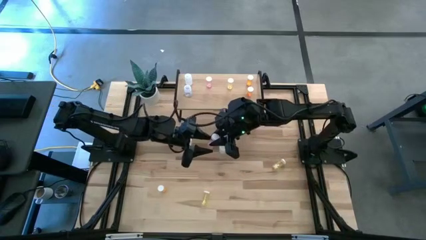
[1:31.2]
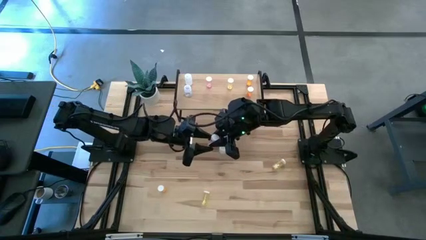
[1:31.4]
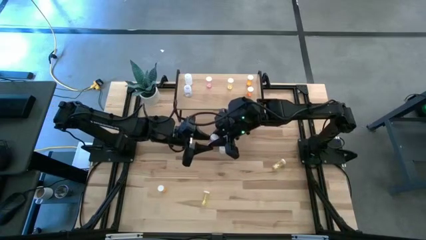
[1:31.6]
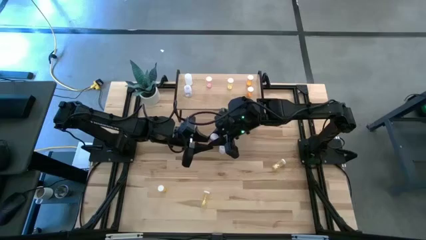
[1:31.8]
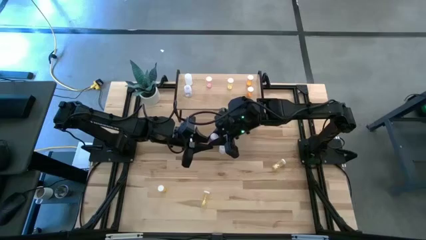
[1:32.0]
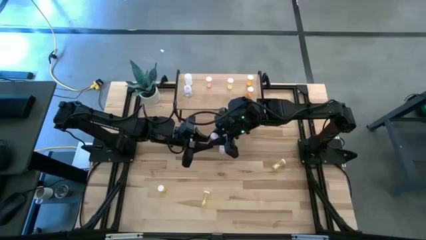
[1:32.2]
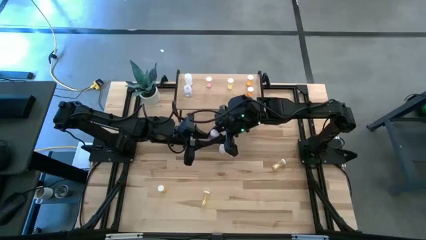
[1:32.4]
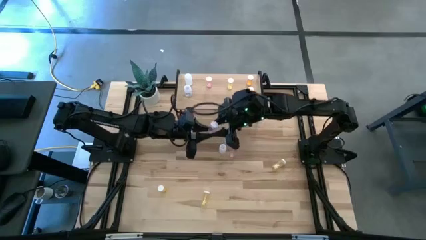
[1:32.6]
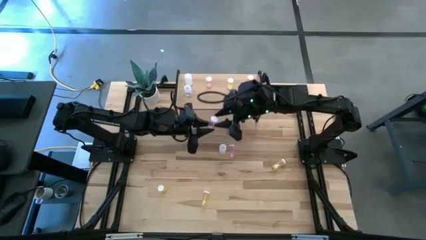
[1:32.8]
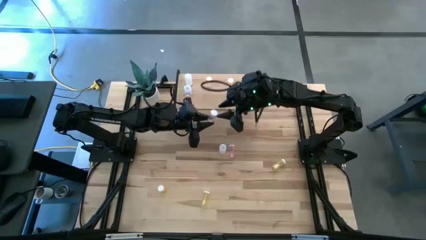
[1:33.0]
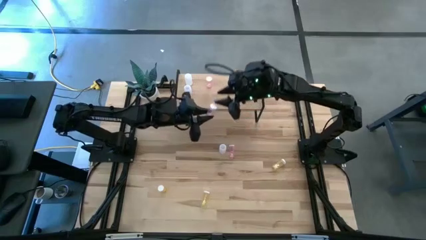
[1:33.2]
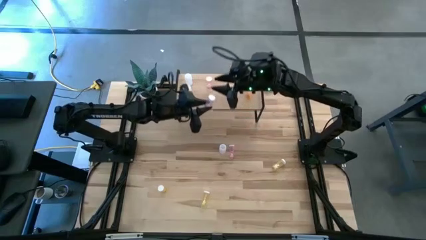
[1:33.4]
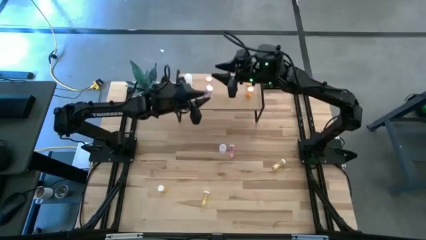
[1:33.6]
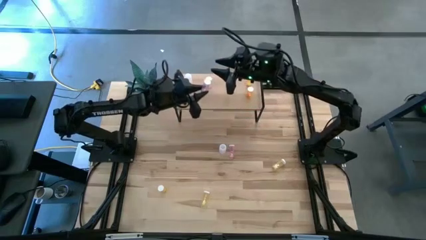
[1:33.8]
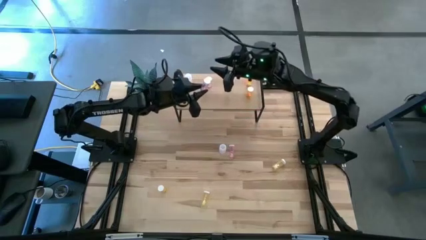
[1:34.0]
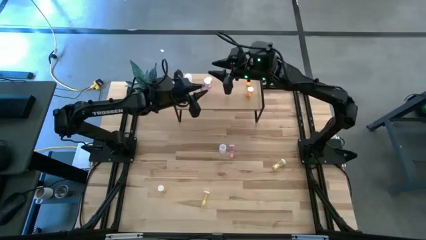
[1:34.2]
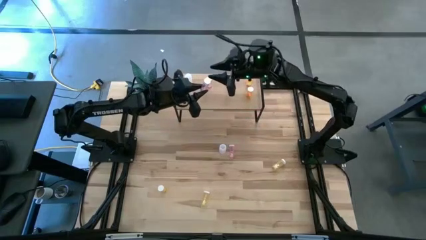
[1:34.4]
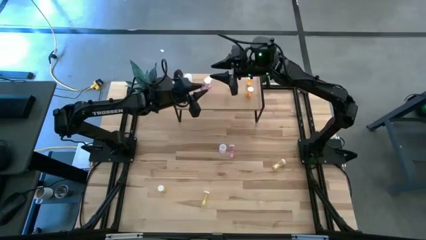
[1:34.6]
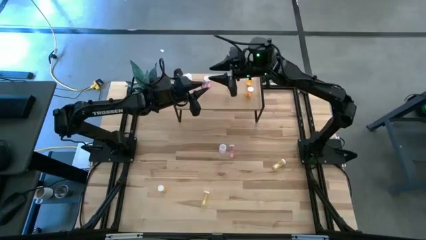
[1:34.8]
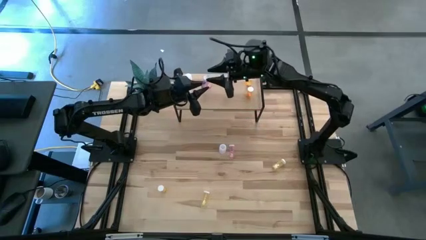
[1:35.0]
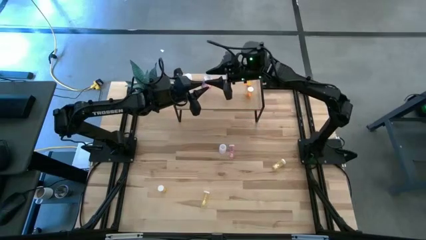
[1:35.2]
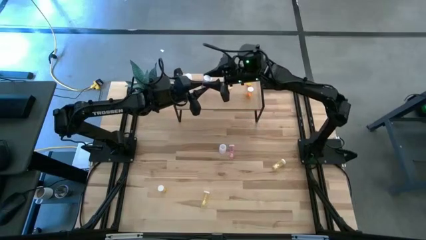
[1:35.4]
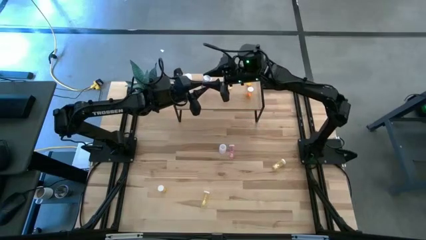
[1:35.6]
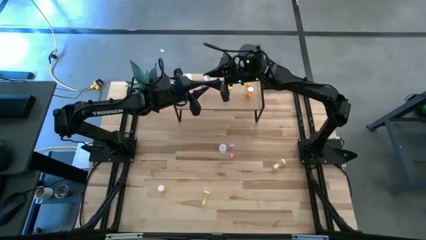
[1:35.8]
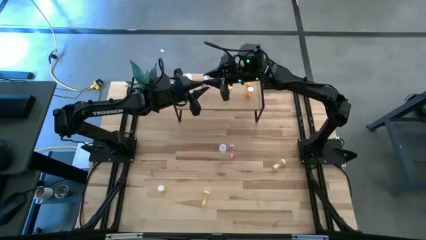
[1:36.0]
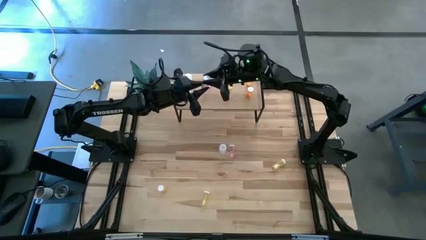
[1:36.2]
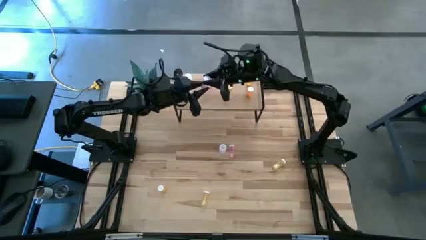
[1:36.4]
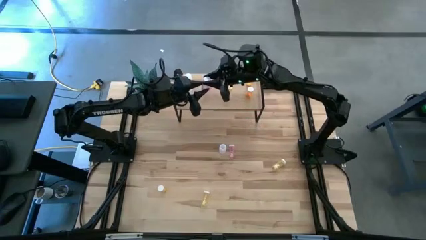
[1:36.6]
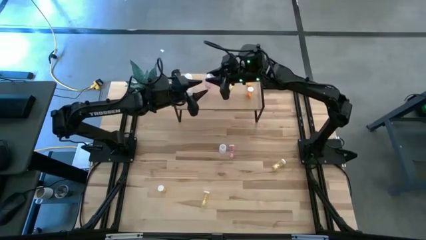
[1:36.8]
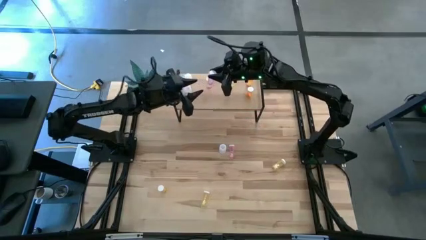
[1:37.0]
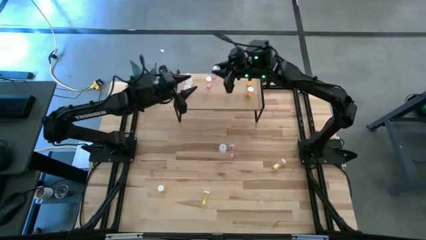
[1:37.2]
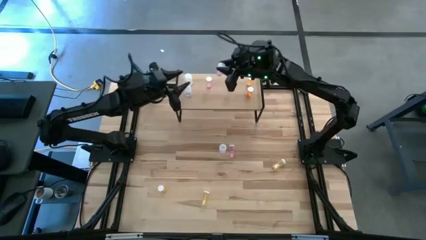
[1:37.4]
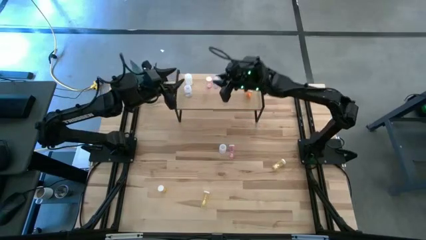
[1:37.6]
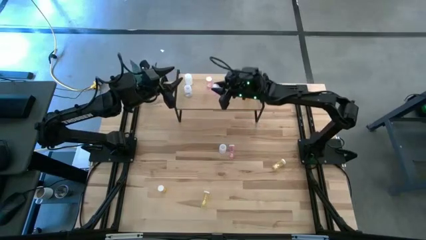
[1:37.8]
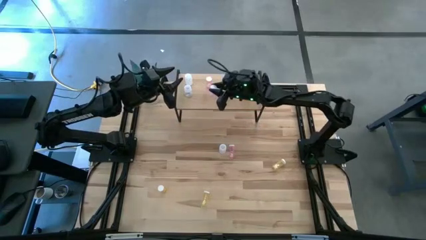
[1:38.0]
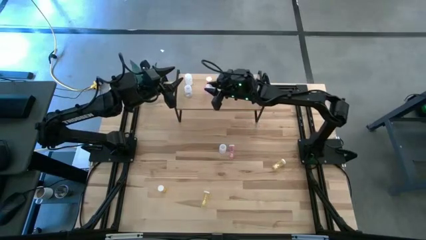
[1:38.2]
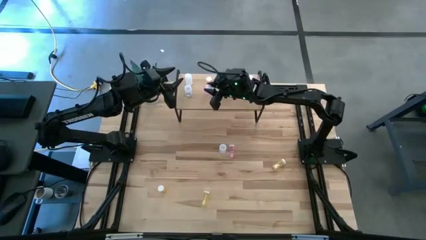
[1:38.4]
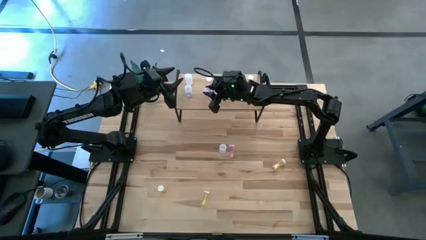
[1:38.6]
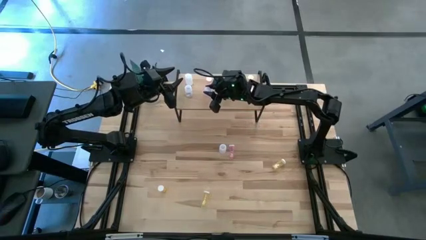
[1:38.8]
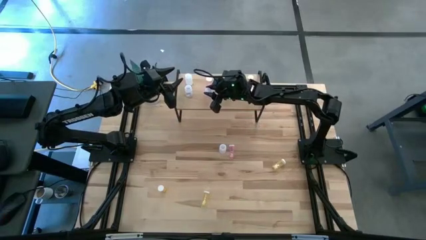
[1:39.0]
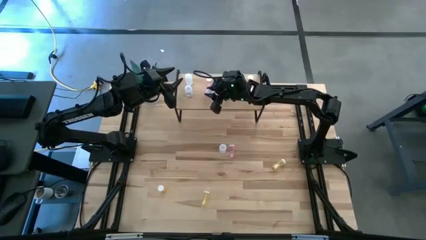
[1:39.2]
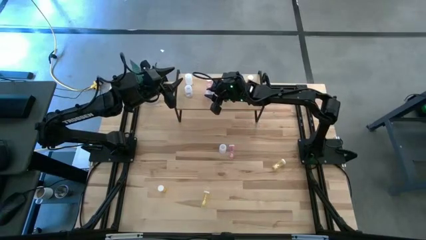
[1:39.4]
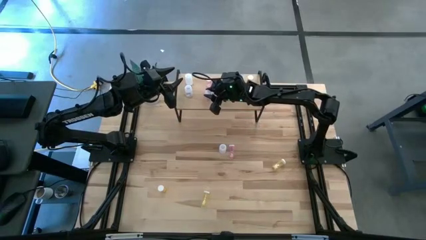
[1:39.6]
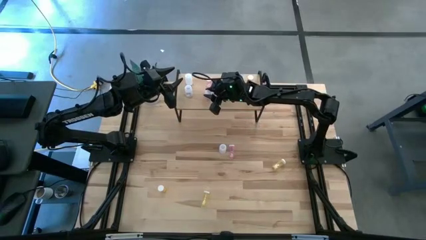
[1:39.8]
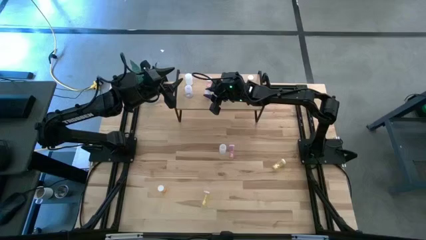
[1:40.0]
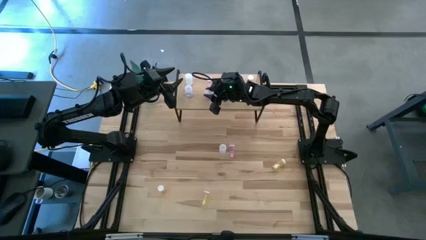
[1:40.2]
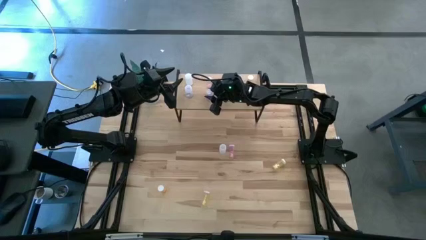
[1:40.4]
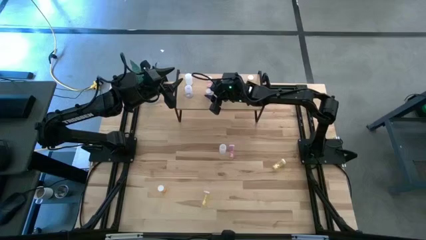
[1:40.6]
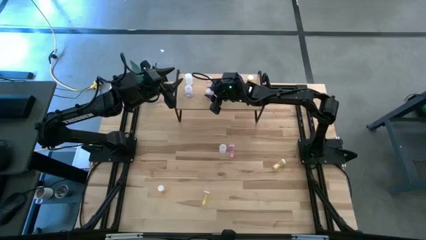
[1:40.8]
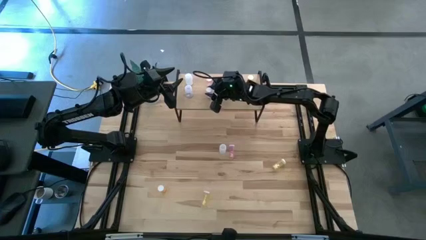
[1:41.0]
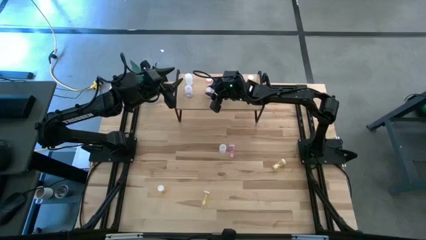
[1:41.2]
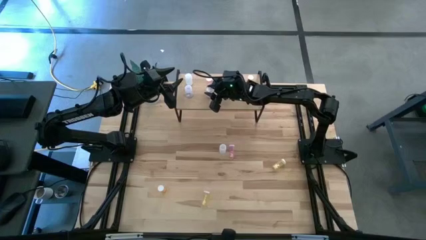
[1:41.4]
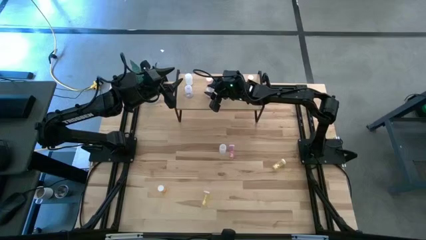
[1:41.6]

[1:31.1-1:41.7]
Task: Pick and place medicine bottles onto shelf by color
Put the right pink pill bottle aligned with the other pink pill bottle on the shelf
